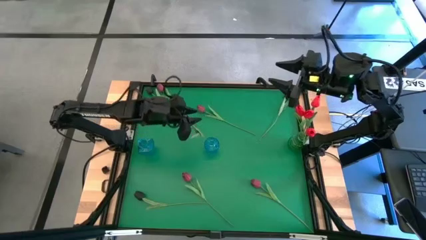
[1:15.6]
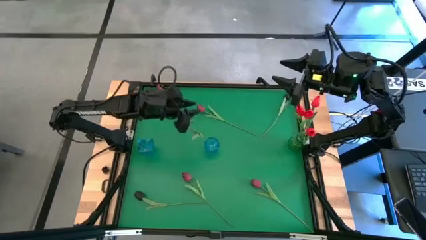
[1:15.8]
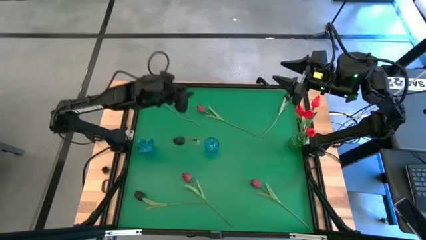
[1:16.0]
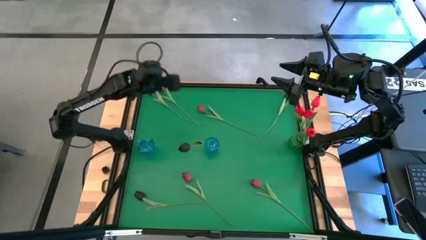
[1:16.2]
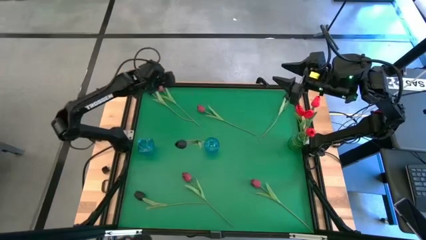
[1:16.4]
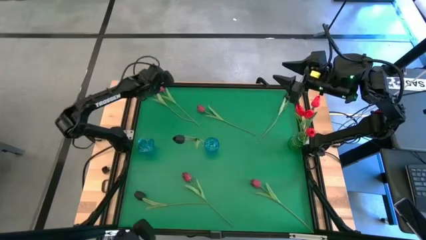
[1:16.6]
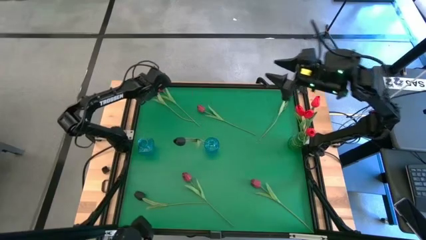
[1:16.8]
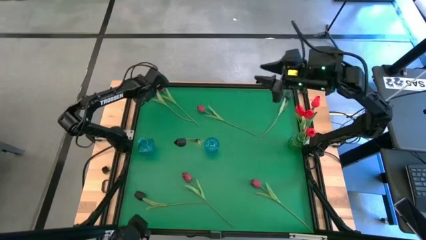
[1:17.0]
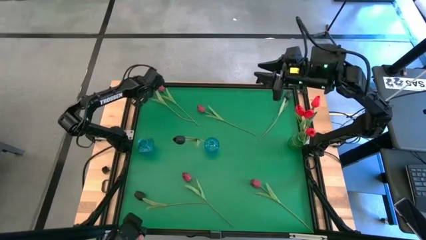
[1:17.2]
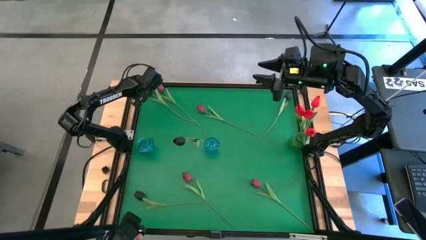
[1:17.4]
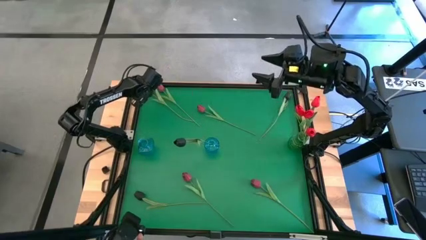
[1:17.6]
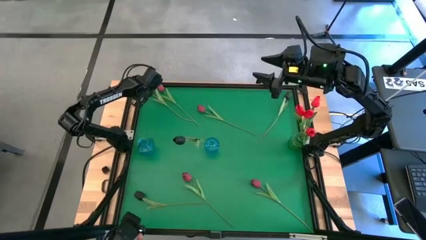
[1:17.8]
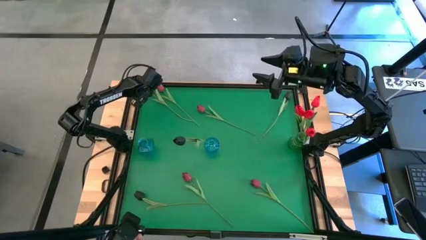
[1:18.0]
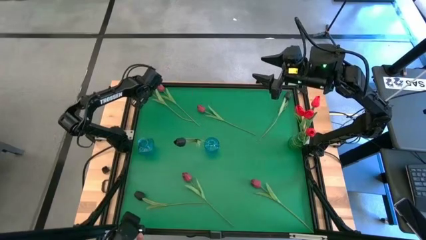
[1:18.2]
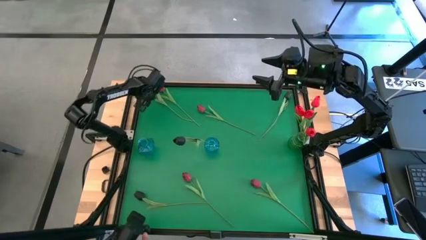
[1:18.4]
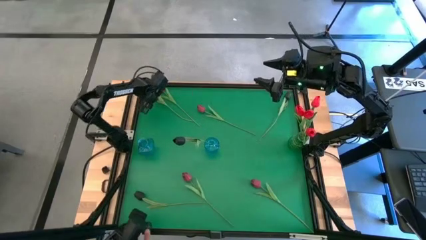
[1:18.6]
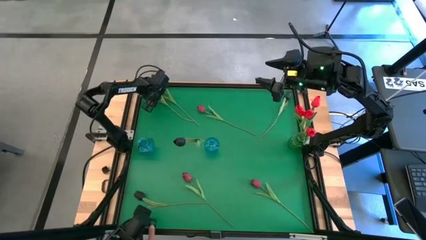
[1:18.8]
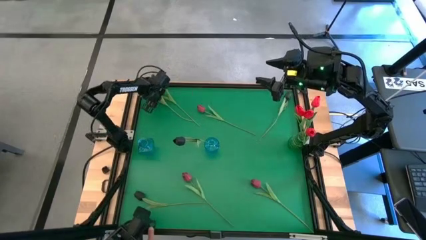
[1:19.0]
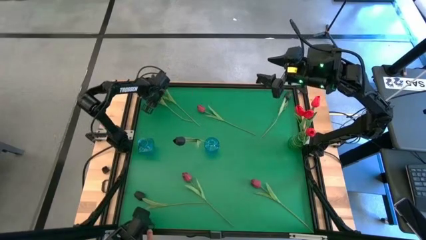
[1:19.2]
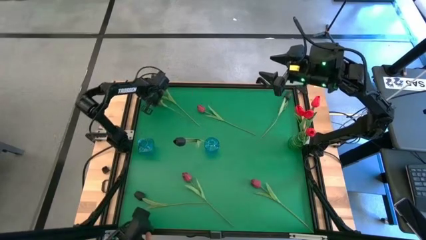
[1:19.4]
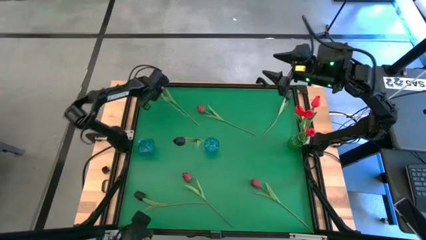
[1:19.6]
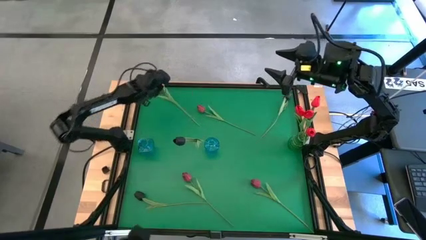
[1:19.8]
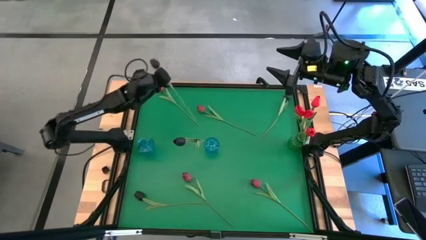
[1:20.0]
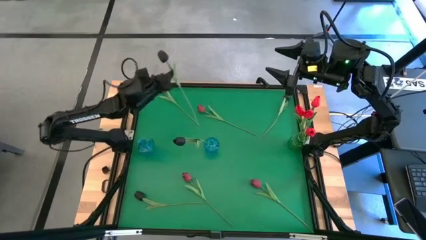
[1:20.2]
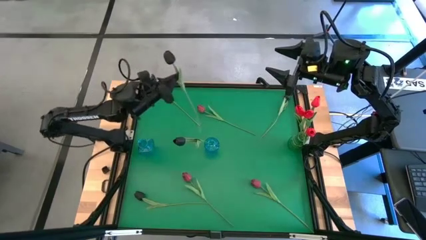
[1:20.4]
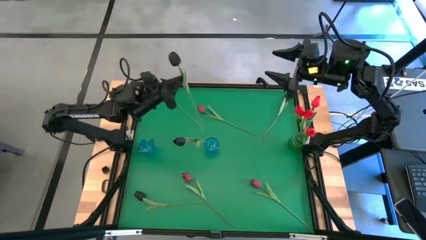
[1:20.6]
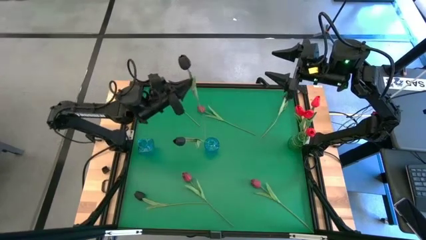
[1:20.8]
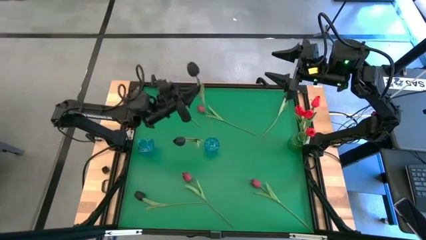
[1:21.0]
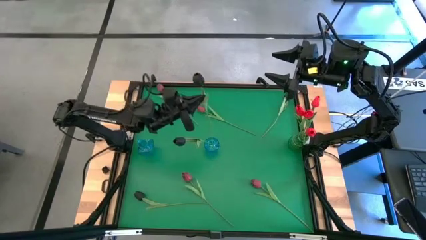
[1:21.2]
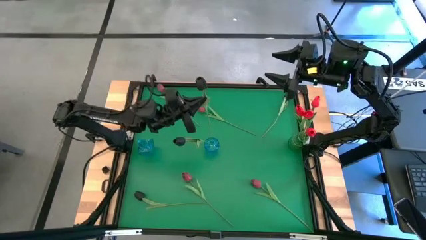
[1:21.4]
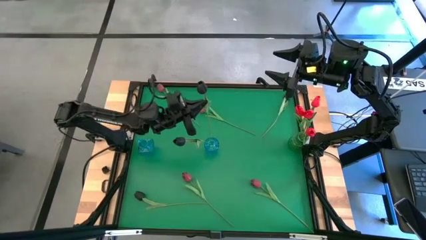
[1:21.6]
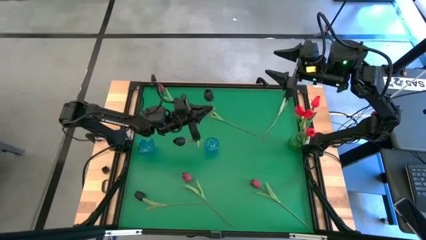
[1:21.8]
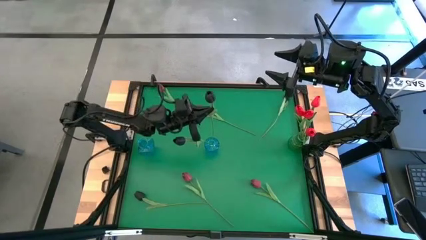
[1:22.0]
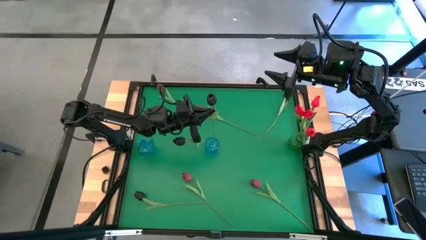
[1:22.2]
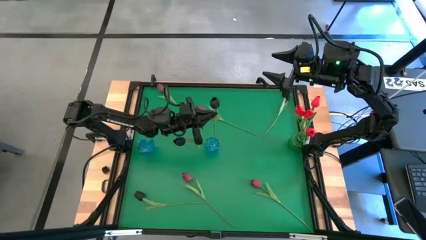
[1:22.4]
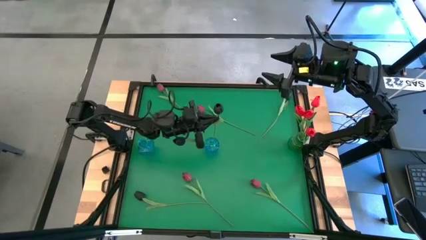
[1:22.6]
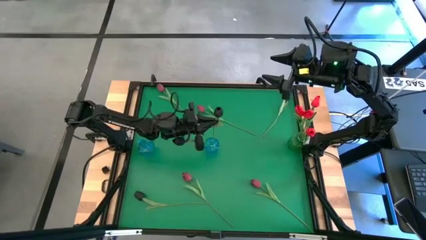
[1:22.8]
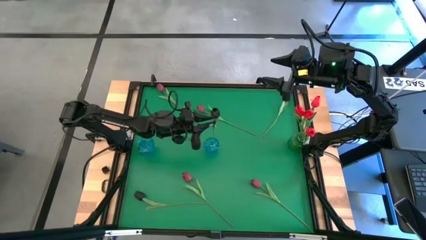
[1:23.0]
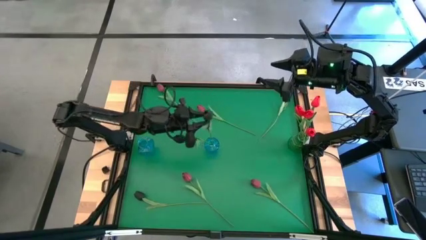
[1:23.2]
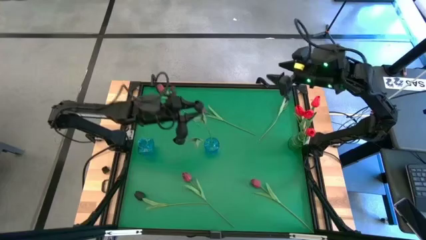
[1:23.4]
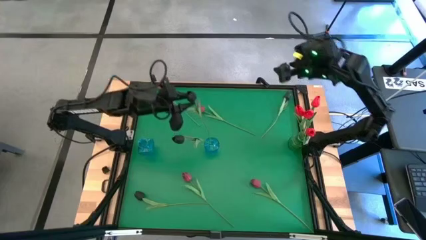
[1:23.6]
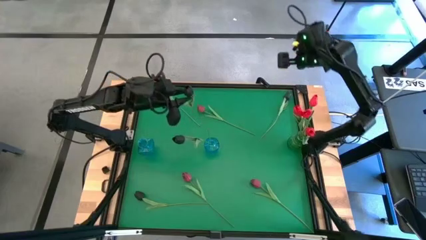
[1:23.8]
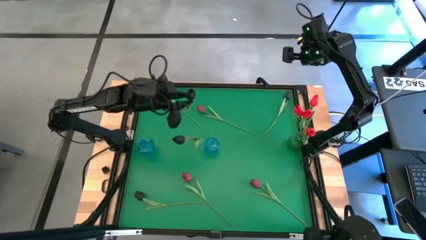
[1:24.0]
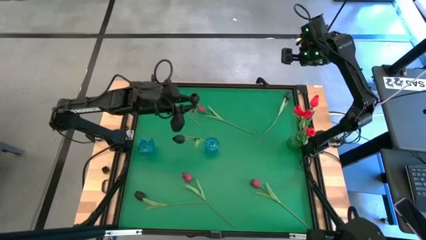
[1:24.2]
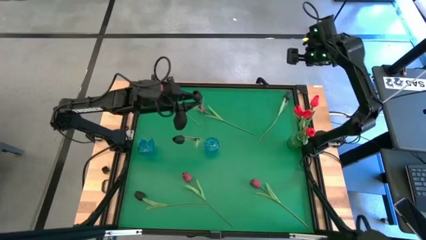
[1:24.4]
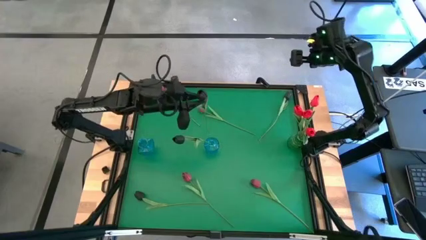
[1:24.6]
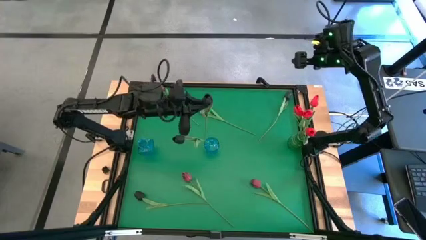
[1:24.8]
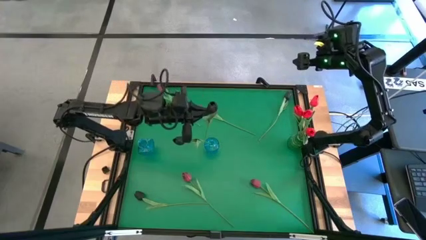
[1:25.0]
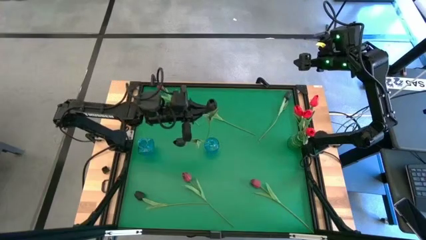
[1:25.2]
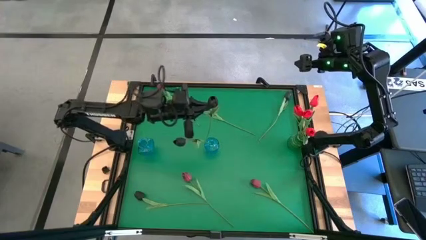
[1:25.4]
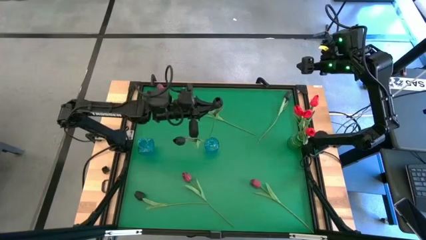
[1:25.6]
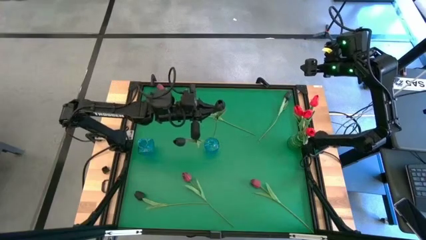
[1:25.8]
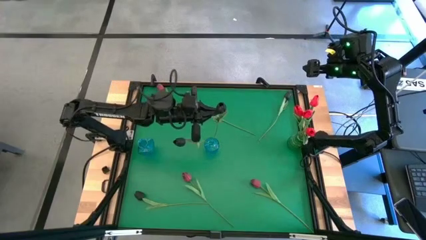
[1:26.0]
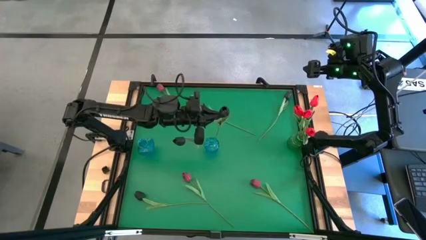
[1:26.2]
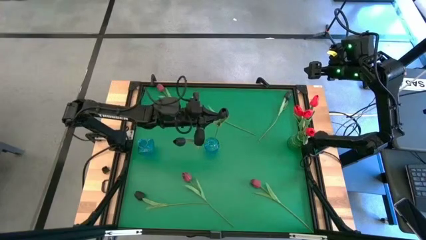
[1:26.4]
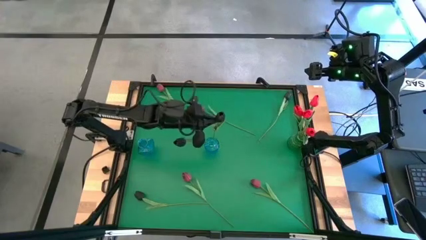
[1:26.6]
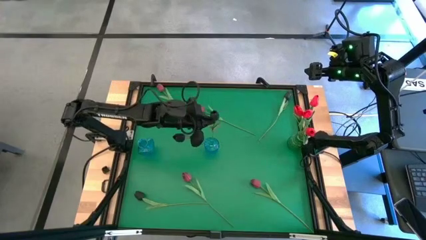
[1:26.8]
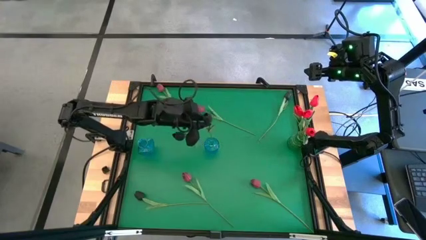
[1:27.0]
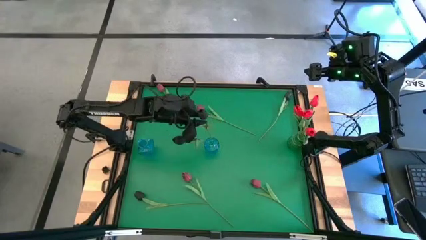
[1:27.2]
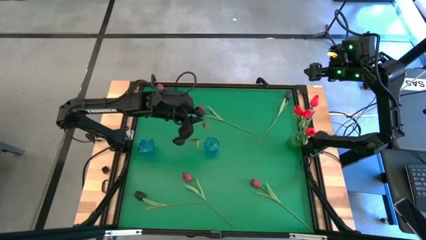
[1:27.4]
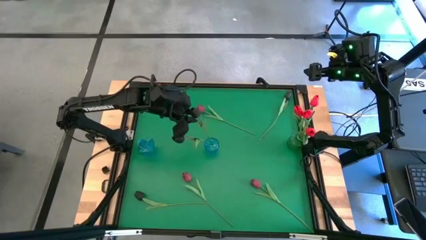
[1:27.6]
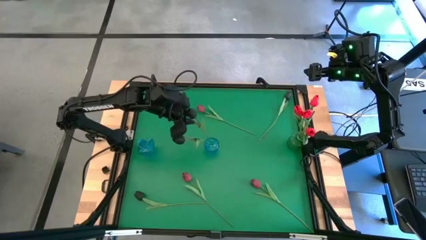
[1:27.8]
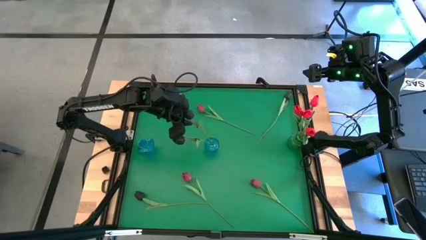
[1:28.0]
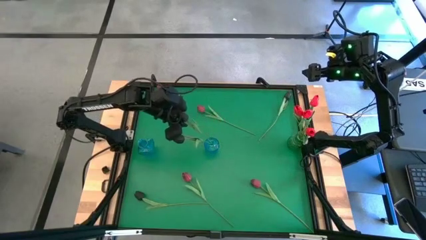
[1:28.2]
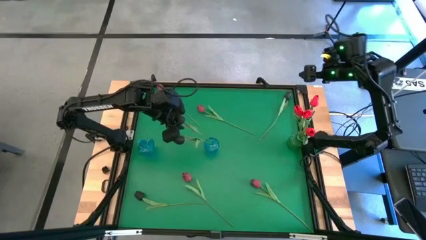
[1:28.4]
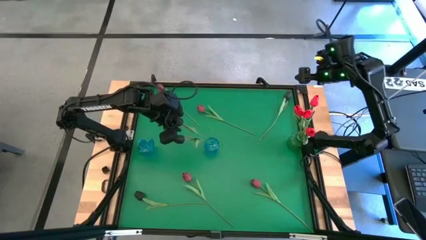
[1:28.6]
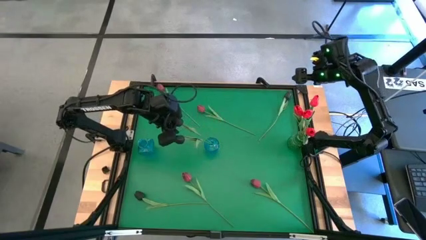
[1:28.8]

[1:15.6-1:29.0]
Task: Sort flowers into vase by color
Put the black flower into the right blue flower vase

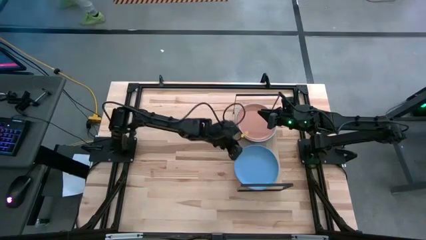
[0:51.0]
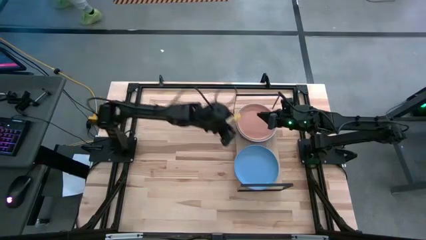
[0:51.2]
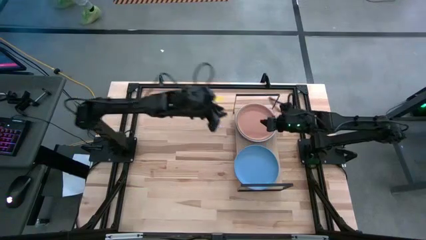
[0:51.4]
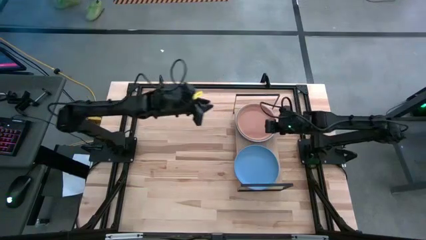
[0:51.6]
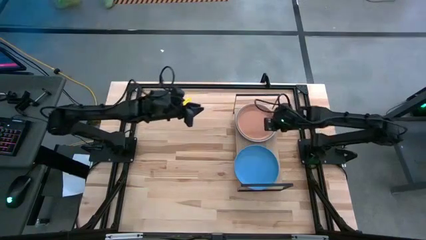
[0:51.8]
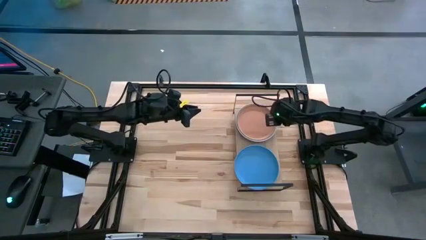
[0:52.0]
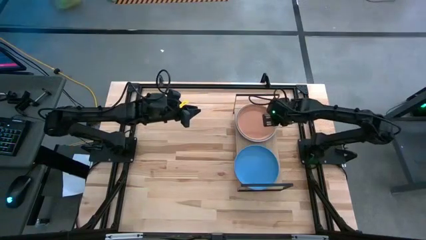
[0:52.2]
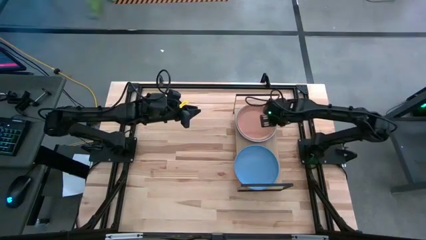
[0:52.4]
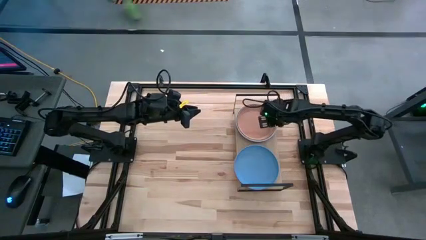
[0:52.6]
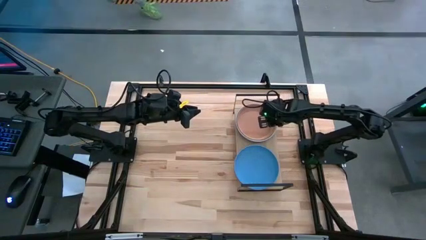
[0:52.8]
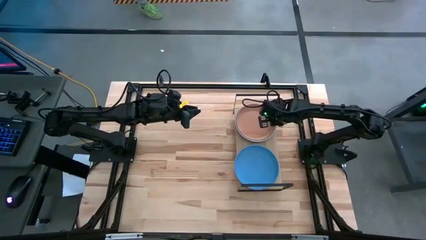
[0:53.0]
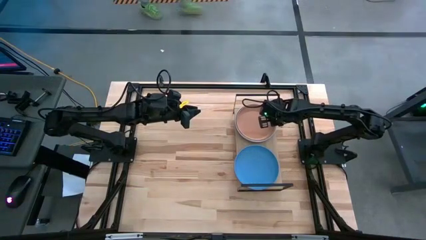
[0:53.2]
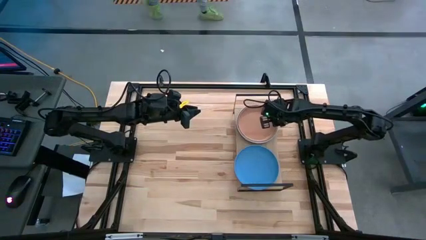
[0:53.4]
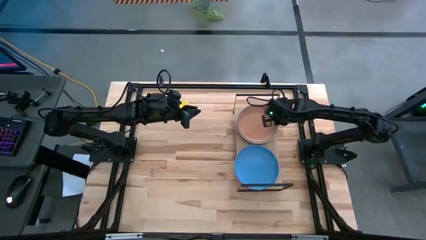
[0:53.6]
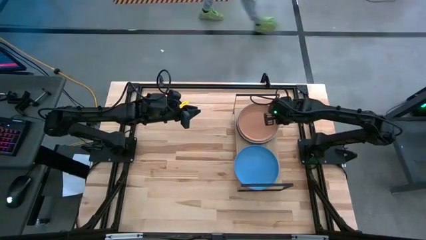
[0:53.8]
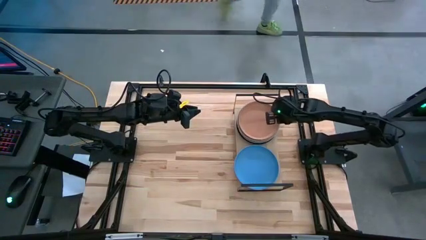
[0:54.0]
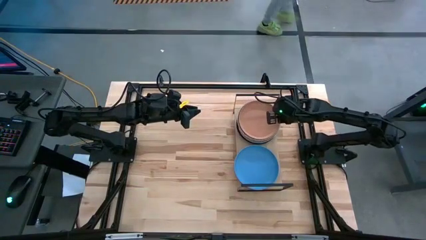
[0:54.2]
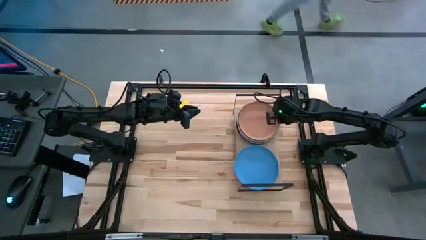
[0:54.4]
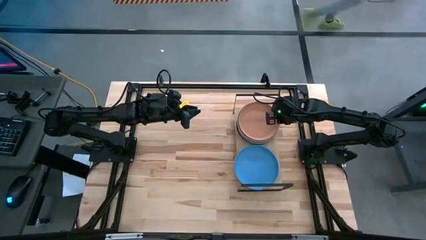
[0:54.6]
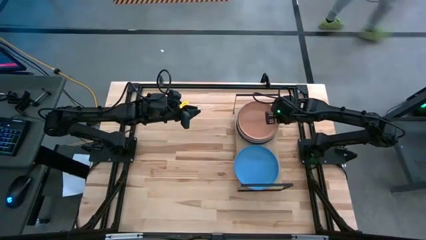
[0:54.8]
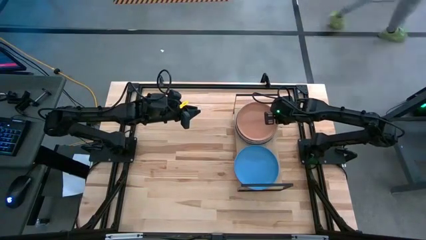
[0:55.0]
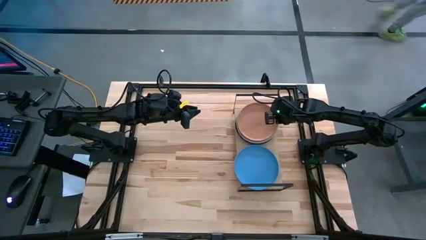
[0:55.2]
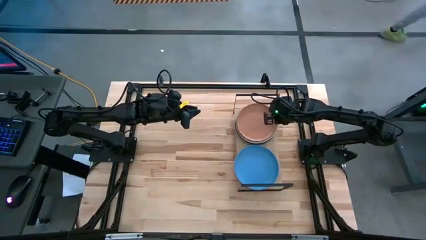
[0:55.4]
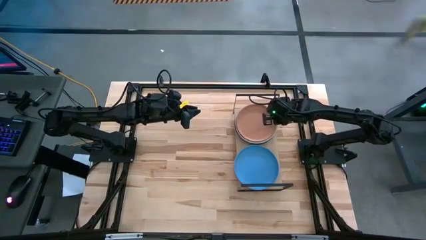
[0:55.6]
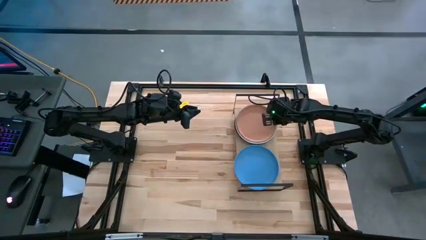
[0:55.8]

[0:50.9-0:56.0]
Task: Place and stack plates onto a shelf
Adjust the plates on the shelf
